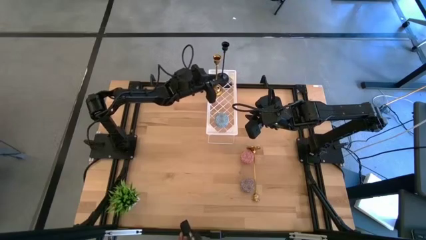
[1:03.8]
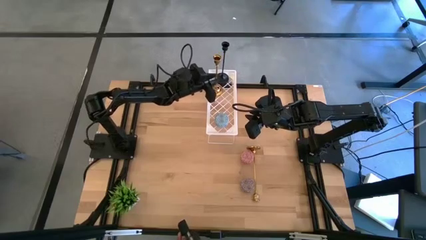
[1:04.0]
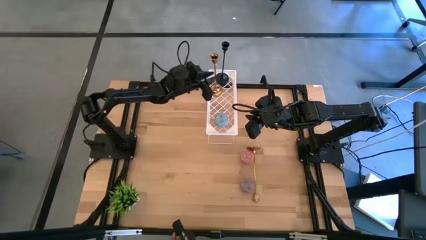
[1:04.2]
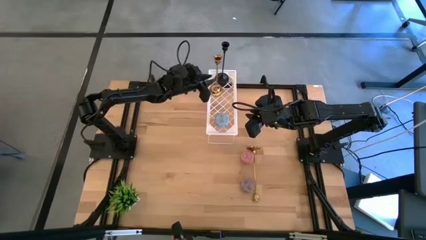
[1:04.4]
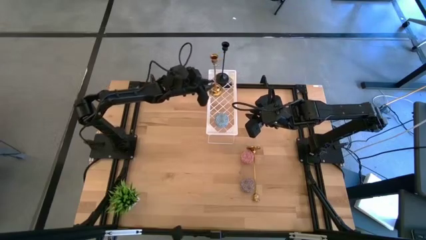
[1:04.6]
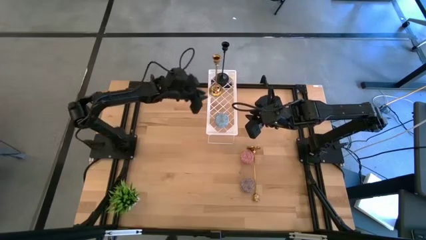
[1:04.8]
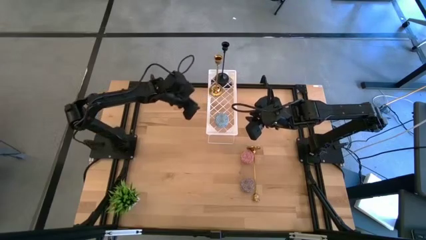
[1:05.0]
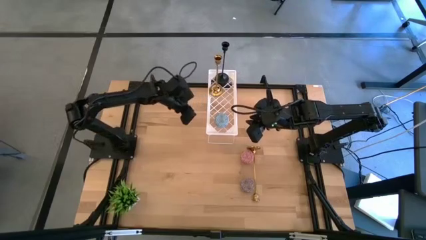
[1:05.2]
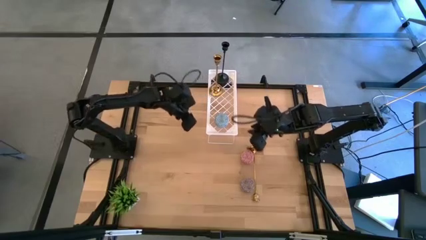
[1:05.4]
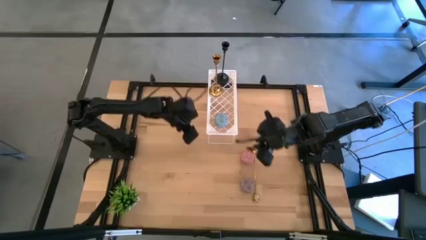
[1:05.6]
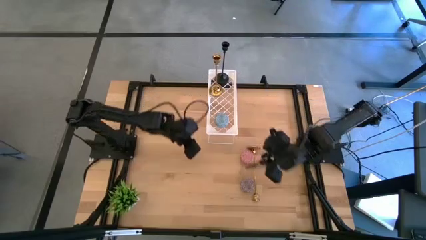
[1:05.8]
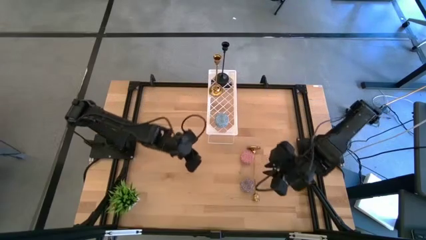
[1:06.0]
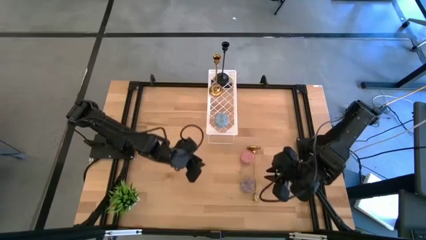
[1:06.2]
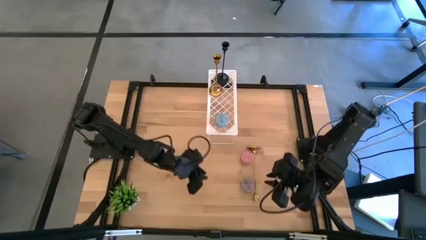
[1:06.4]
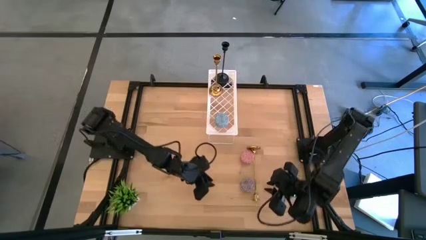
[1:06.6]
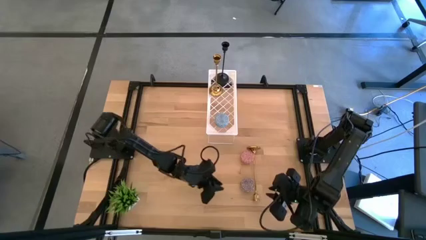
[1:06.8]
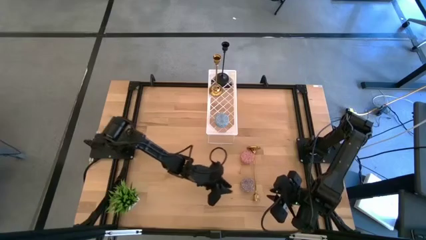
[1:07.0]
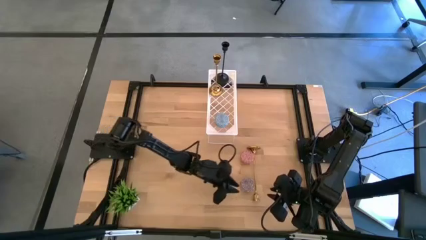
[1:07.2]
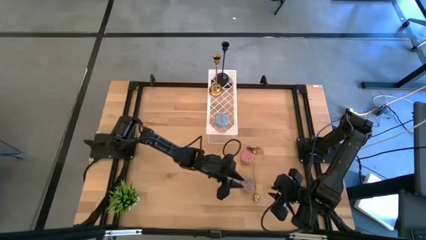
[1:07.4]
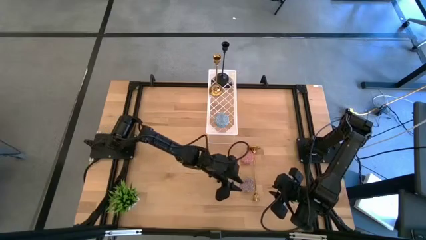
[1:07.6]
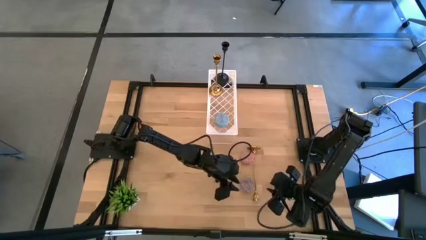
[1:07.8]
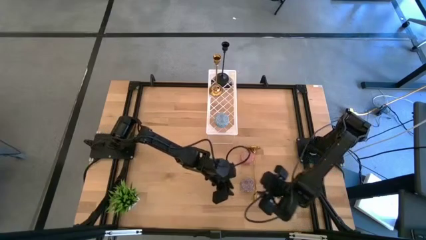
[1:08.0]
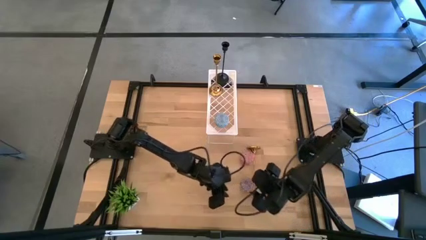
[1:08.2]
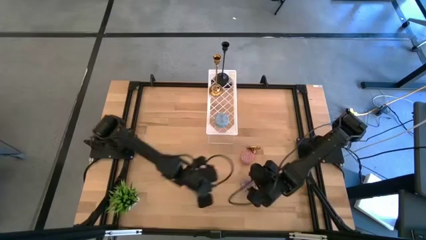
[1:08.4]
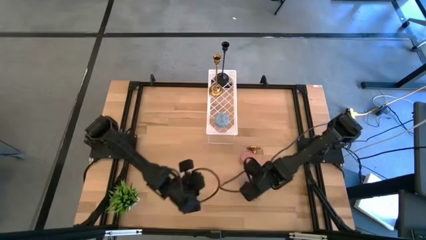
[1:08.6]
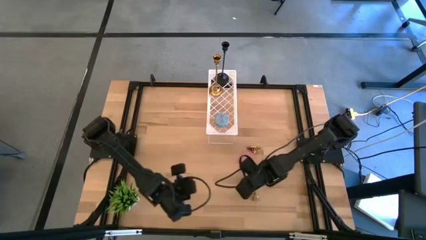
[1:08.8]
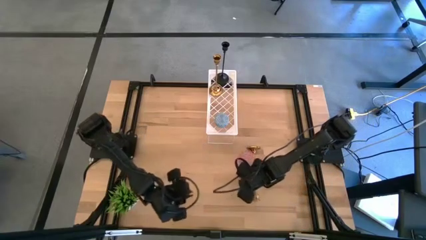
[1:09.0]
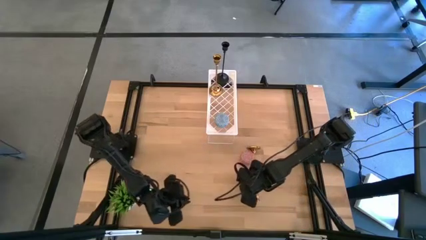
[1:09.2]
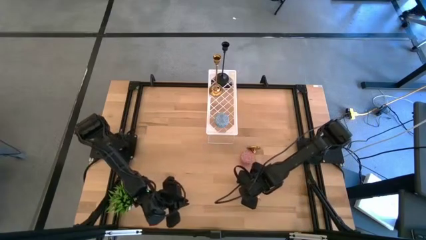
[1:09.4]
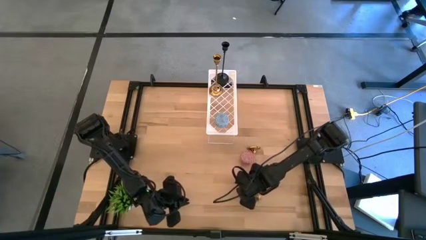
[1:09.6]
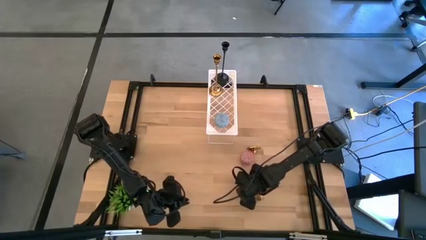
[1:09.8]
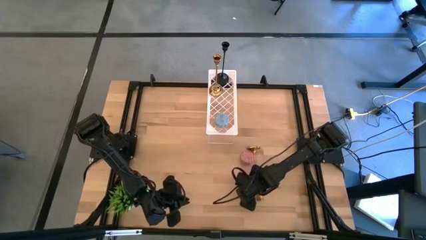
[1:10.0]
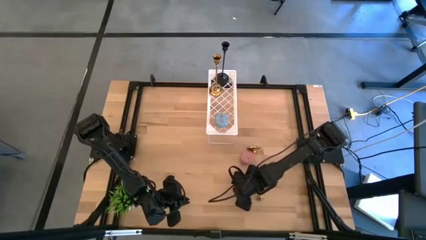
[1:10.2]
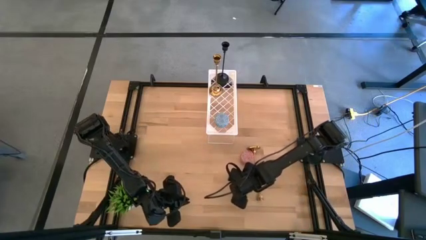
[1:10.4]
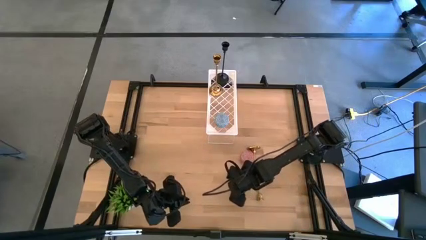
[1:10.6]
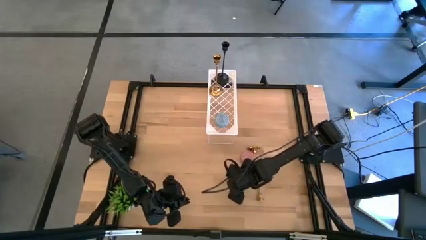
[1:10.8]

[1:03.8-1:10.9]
Task: Pick & Place candle stick holders
Put the red scented candle on the shelf

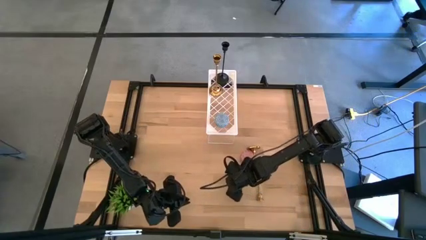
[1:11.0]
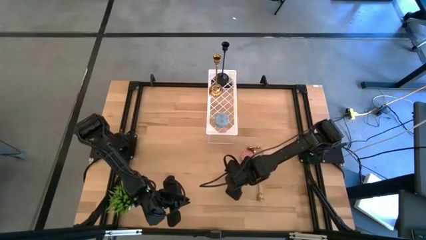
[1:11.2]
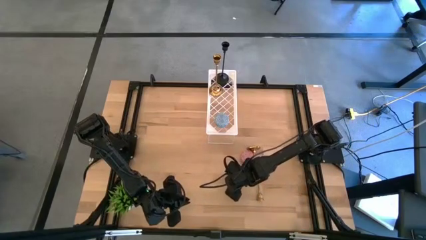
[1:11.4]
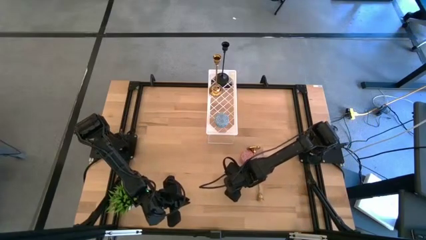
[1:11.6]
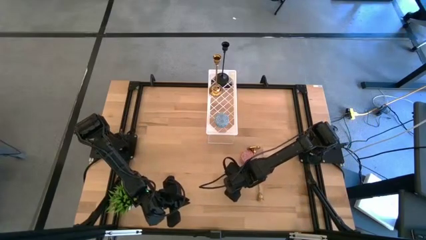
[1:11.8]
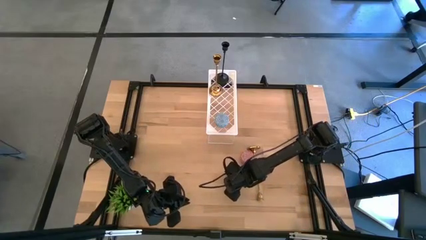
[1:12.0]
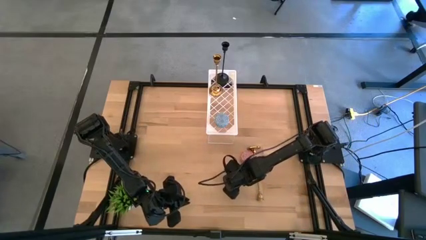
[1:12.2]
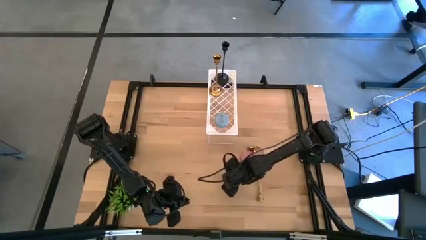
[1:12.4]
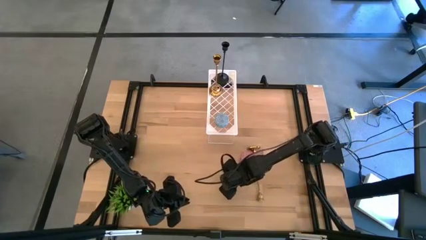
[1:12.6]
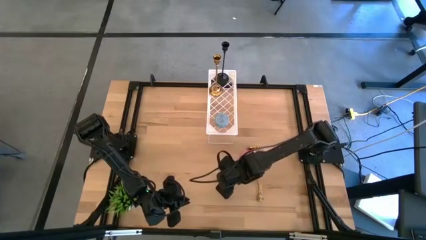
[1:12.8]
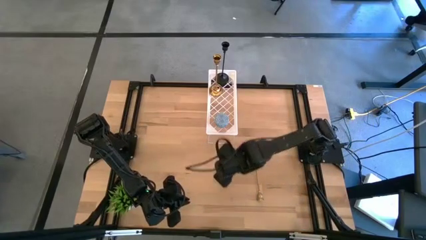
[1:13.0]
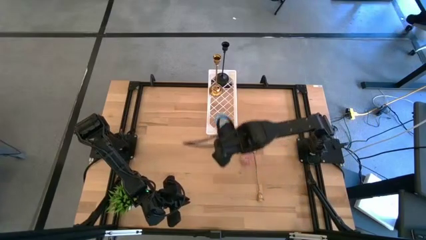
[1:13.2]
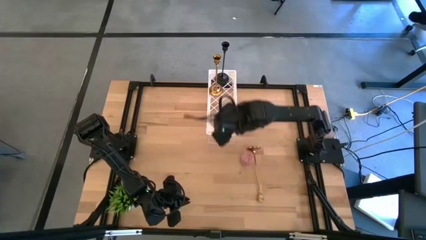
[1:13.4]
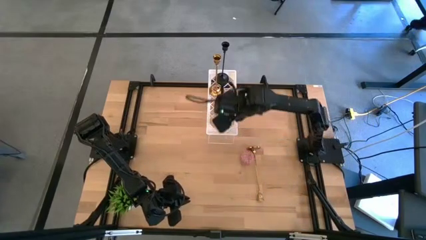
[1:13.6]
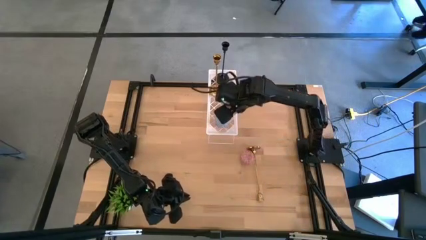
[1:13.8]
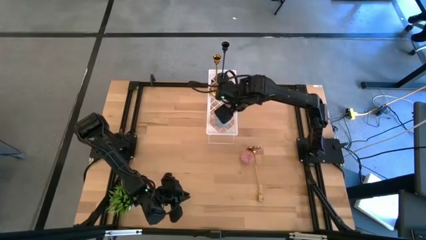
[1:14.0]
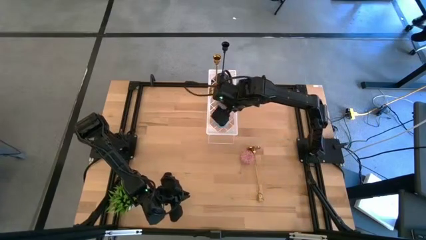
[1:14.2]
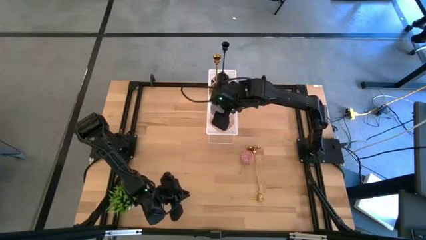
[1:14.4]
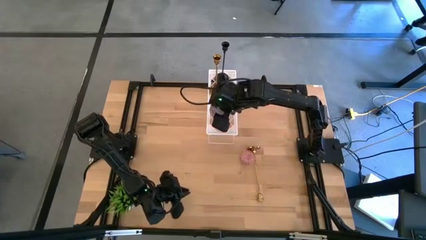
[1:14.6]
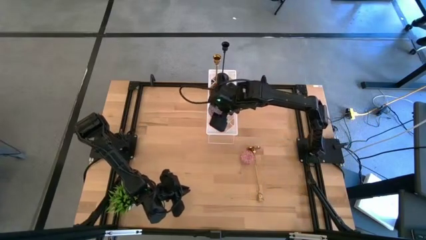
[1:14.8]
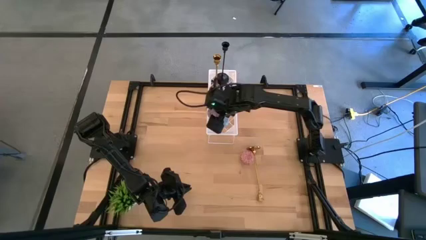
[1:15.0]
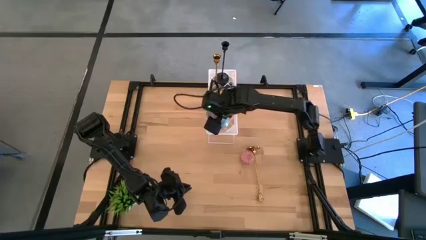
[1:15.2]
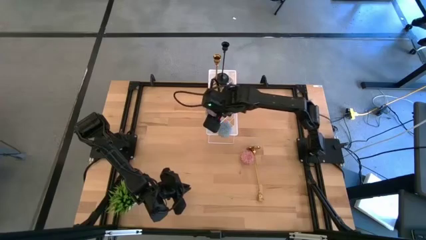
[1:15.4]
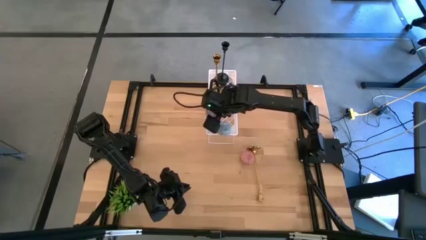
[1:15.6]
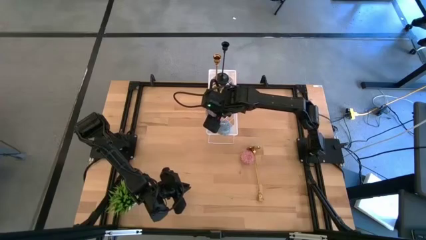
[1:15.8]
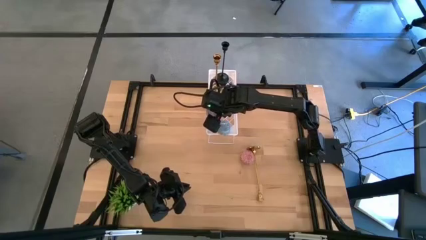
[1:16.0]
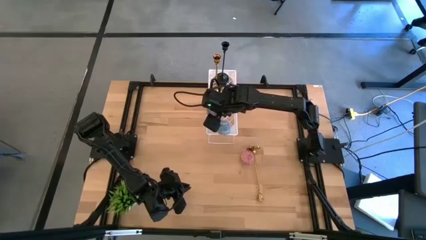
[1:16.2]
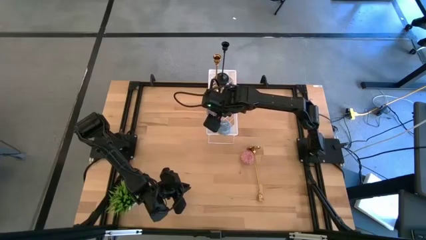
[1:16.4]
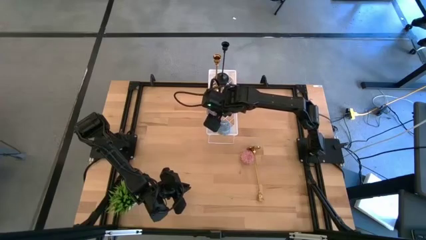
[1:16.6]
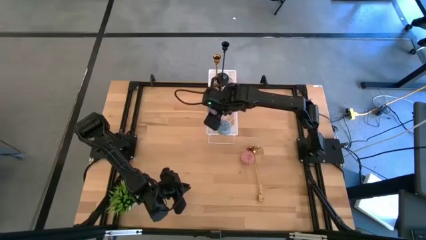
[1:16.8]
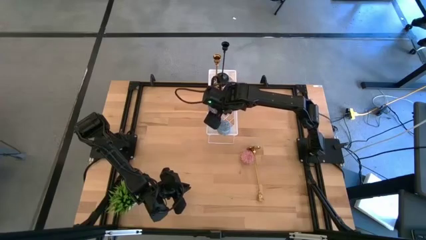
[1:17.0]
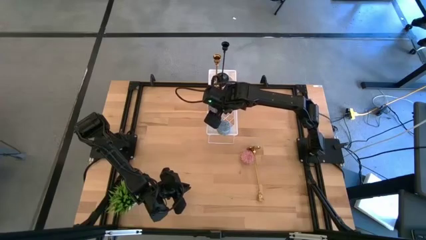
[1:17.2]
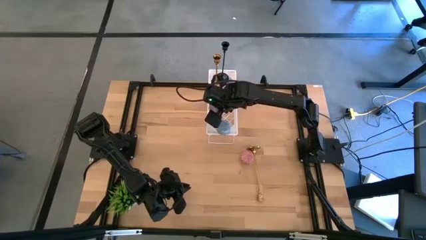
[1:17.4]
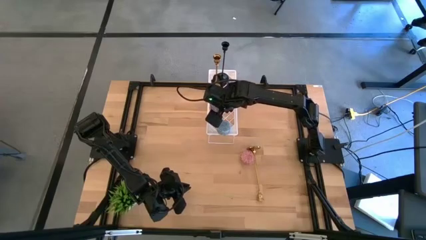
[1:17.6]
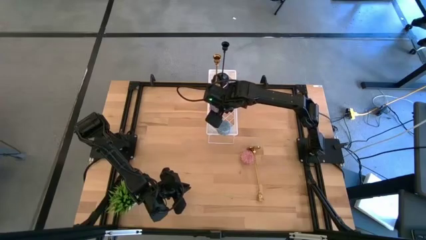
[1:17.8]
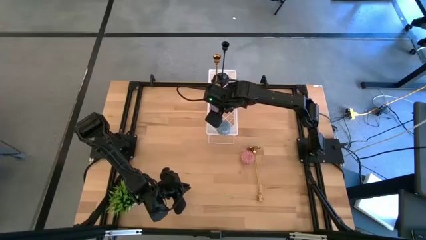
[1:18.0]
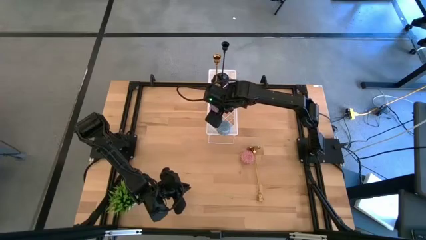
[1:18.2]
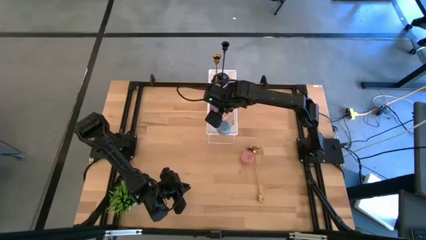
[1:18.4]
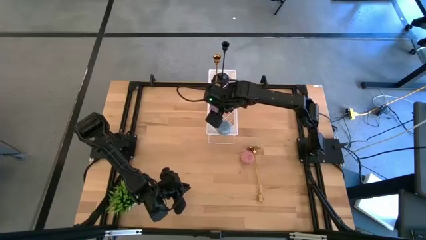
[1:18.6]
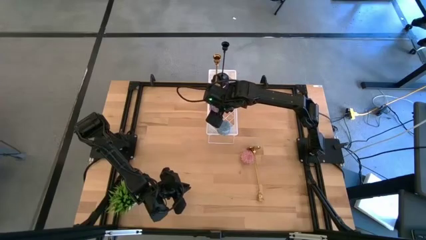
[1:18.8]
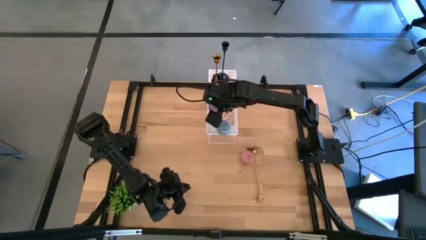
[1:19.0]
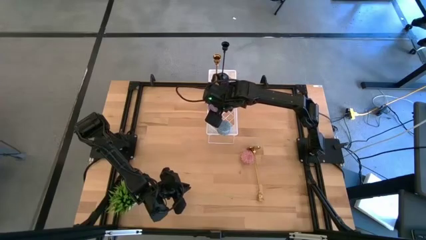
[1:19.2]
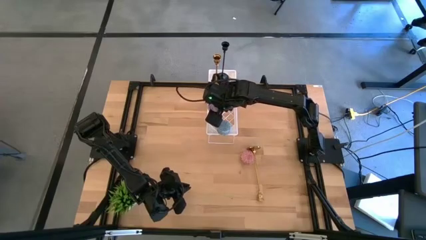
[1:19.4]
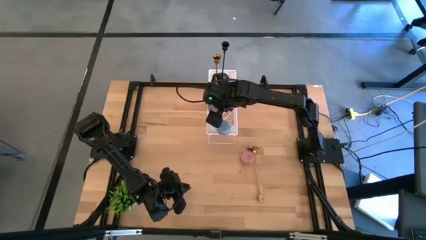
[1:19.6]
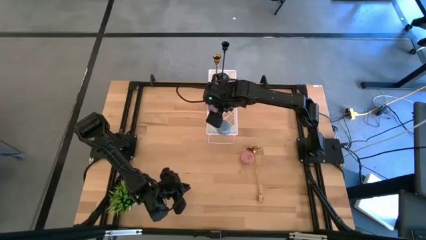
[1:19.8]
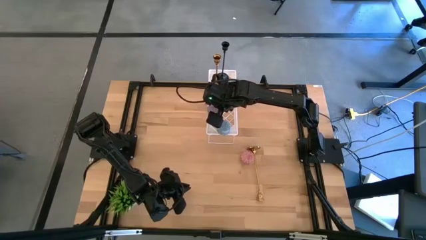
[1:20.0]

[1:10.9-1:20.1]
Put the red scented candle on the shelf
